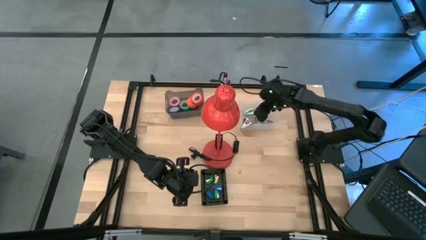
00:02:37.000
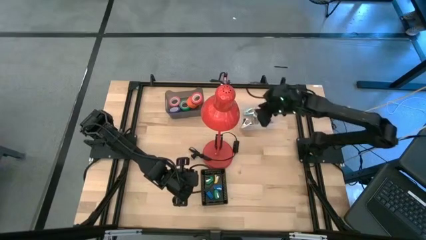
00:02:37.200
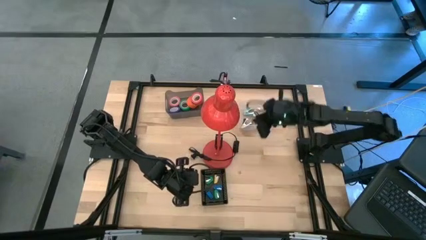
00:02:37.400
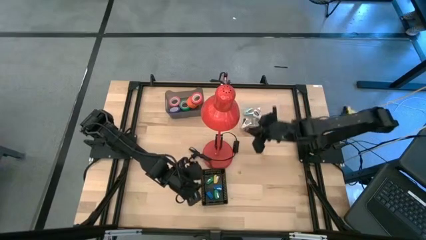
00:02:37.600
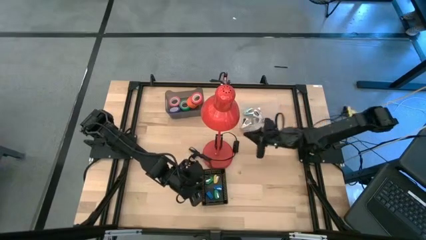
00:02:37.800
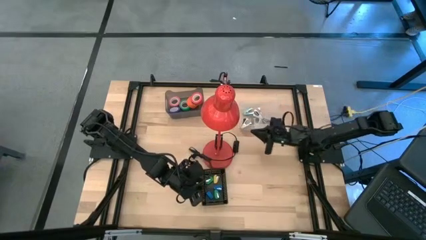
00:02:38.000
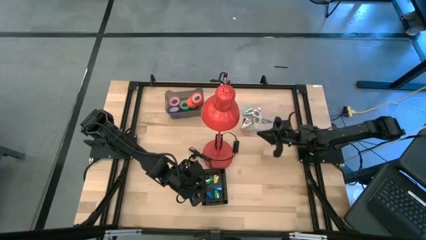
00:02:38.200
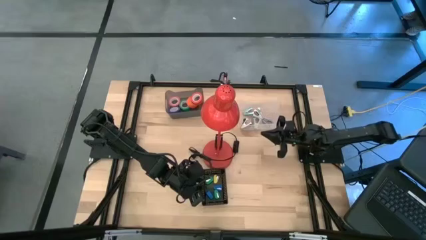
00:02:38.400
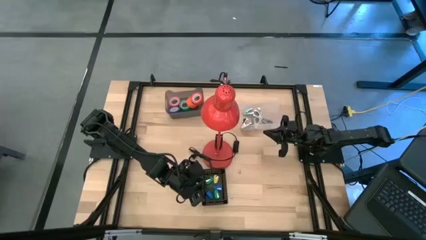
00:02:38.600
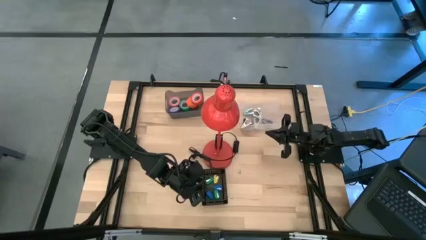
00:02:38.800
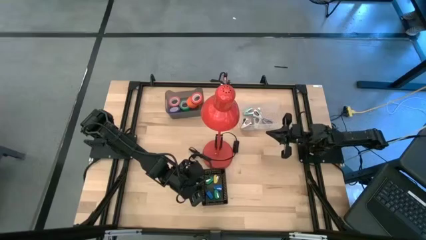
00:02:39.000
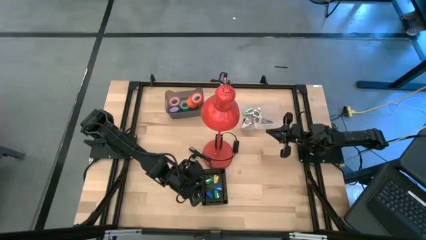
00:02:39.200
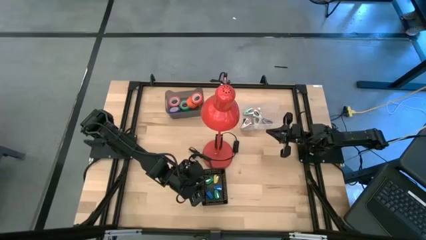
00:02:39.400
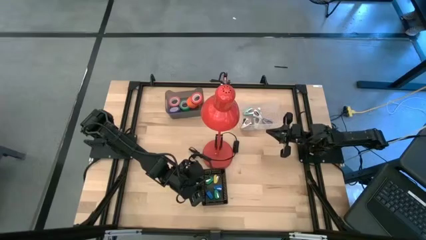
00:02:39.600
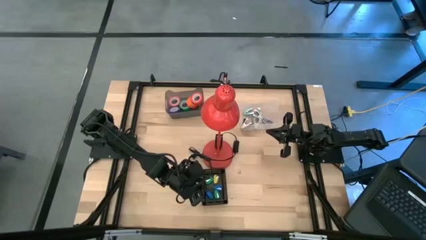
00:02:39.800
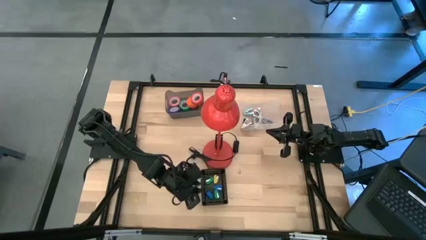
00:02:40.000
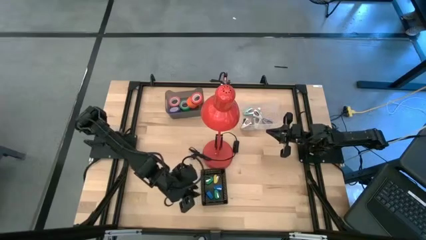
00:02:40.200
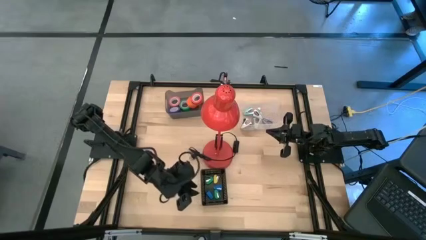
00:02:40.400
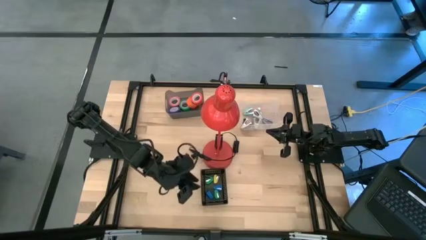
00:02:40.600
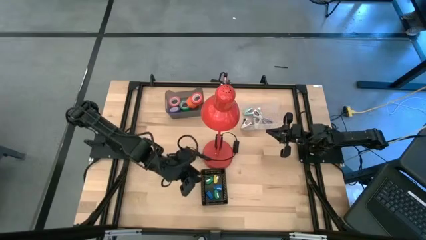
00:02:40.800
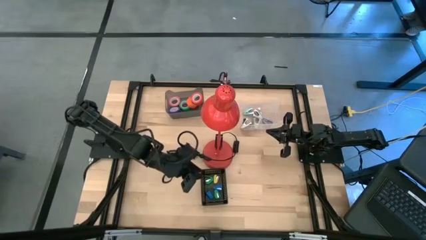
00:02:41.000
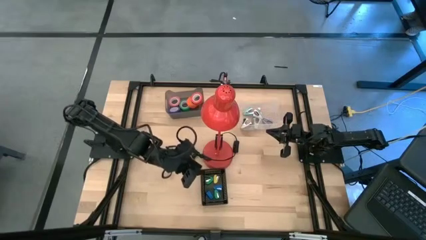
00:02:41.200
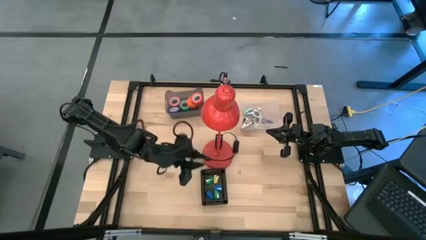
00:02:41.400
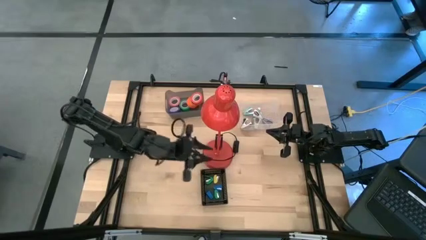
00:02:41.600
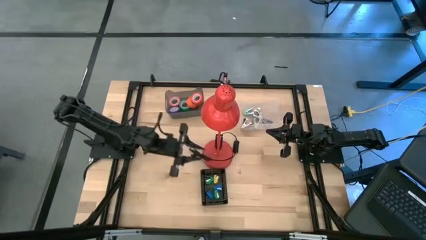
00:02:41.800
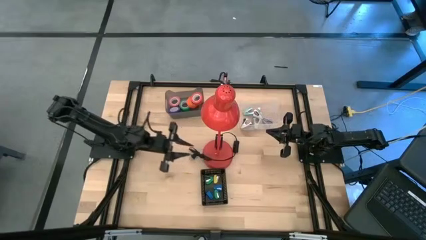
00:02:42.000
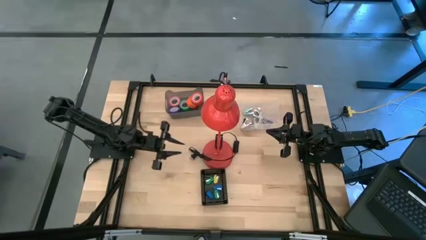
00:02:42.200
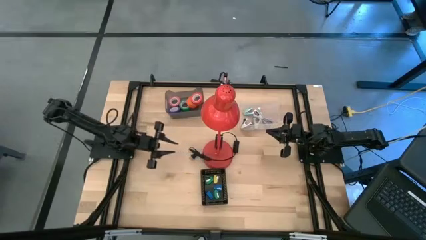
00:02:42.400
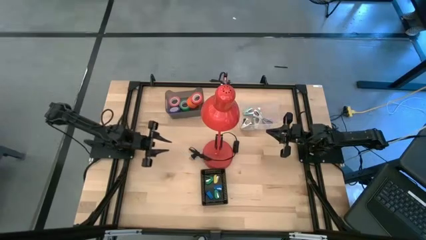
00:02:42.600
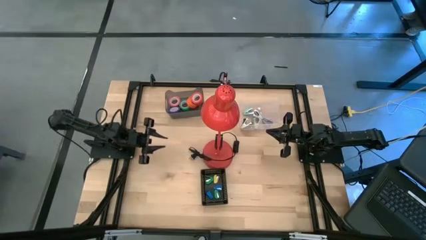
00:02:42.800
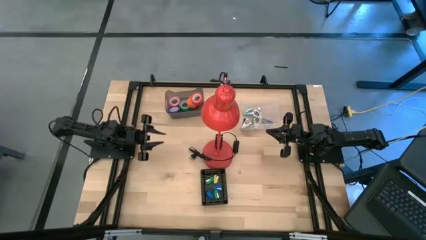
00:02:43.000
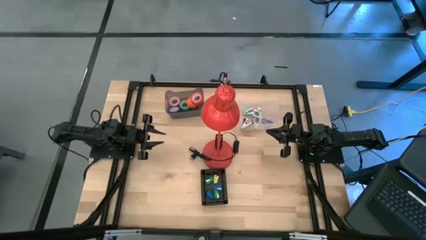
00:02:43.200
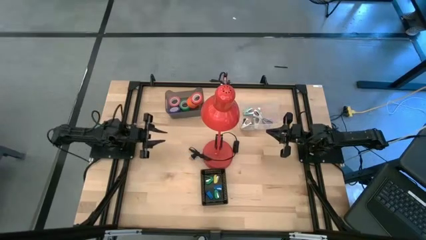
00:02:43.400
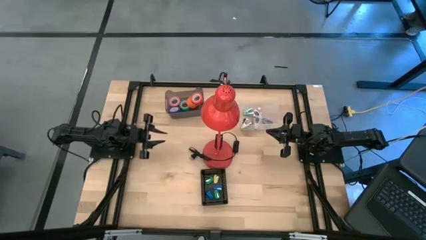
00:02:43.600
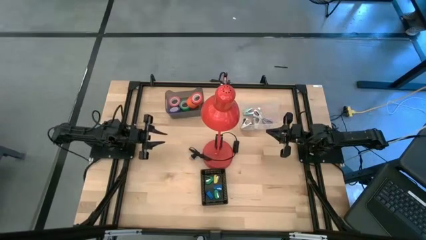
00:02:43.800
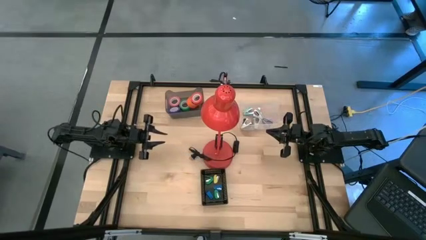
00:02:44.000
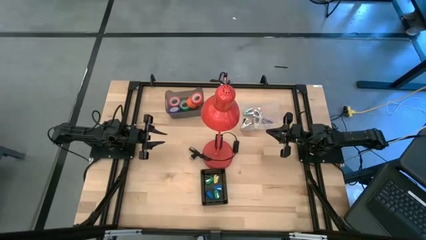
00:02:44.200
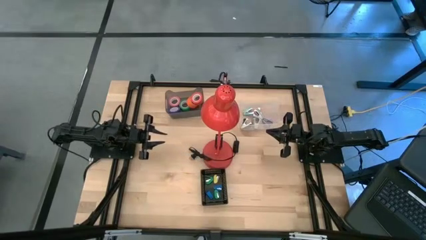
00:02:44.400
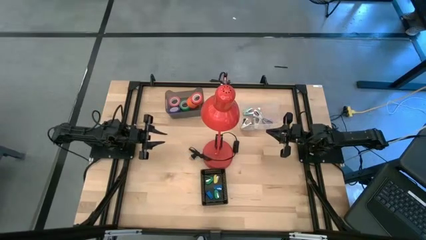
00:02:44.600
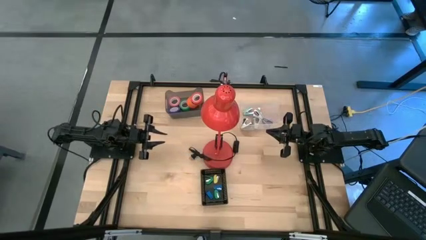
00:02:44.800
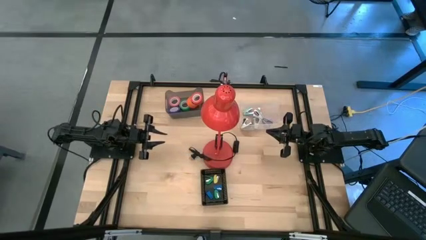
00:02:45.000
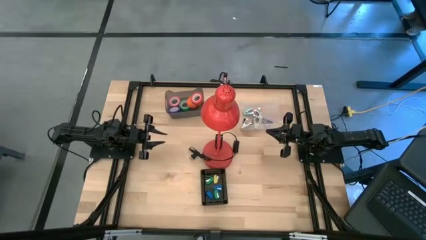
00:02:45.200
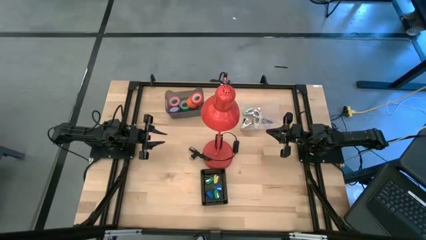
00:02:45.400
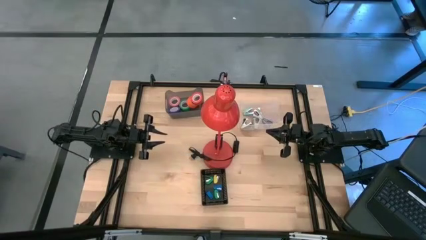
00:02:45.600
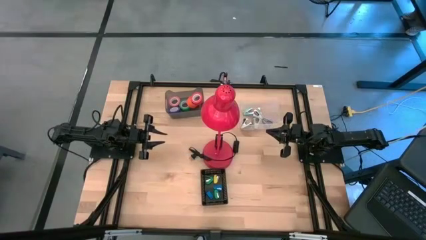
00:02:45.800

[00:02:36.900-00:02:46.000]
Task: Pick and place Stapler, Stapler remover, tape
Return to Home Position

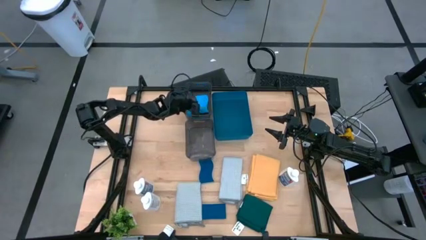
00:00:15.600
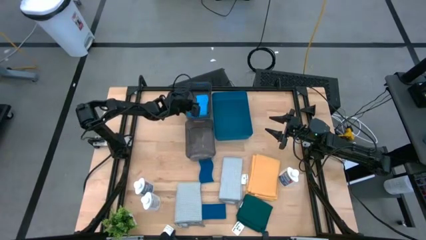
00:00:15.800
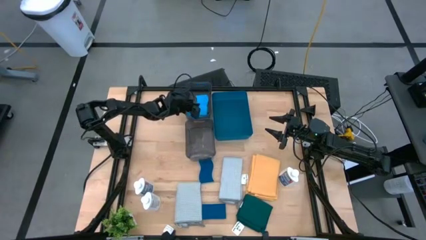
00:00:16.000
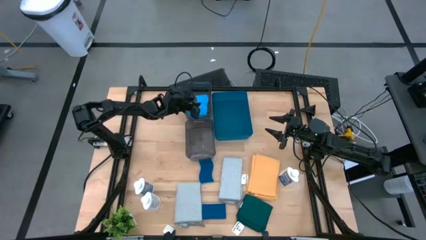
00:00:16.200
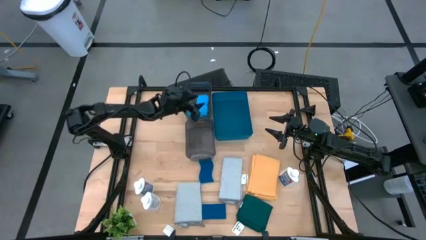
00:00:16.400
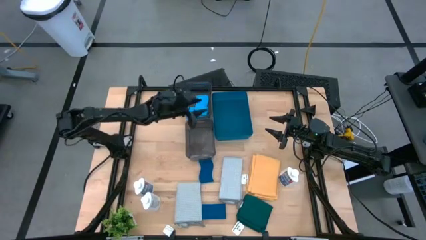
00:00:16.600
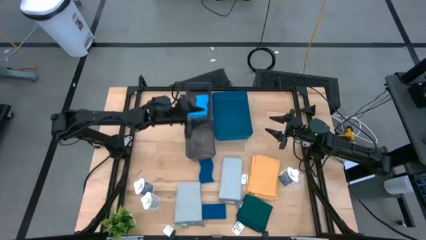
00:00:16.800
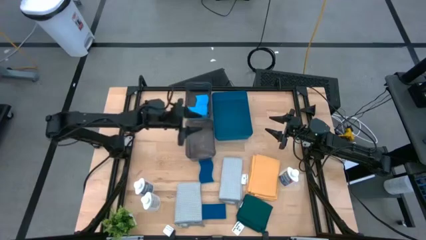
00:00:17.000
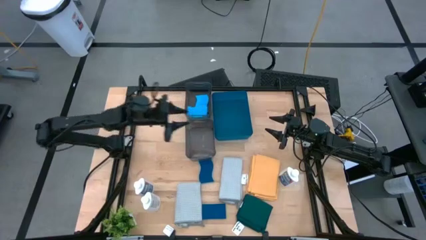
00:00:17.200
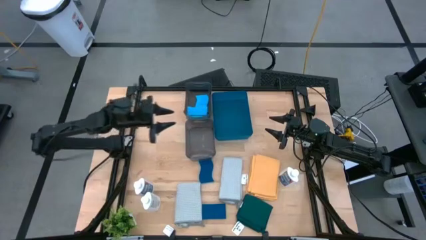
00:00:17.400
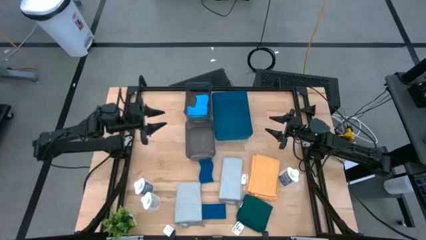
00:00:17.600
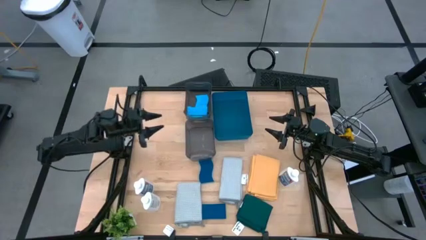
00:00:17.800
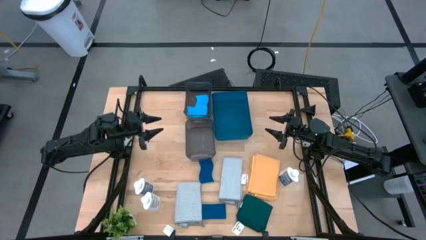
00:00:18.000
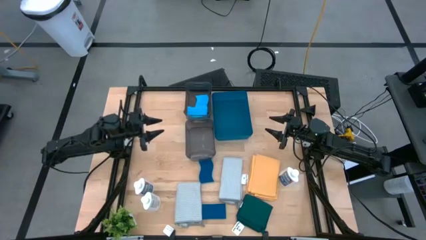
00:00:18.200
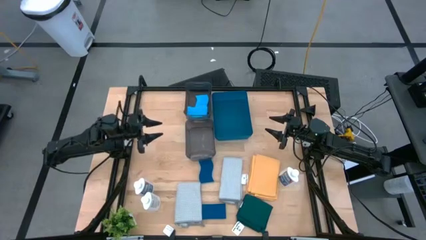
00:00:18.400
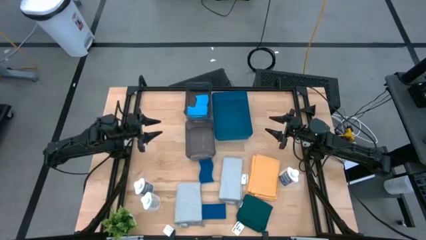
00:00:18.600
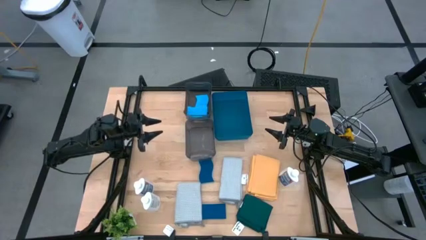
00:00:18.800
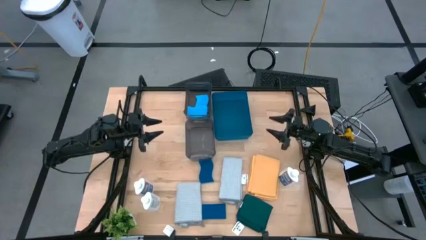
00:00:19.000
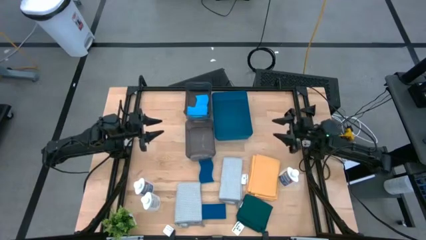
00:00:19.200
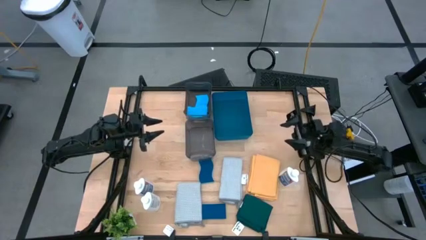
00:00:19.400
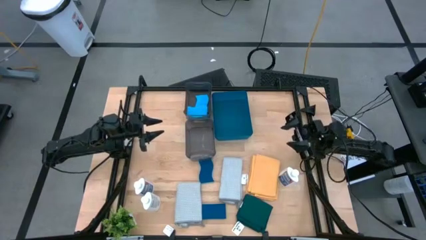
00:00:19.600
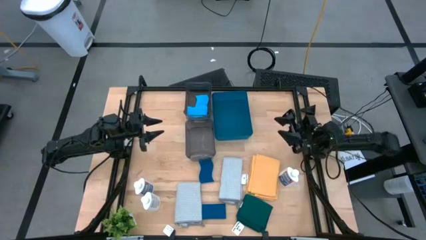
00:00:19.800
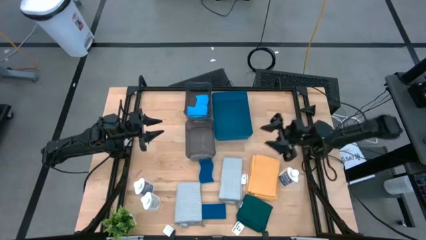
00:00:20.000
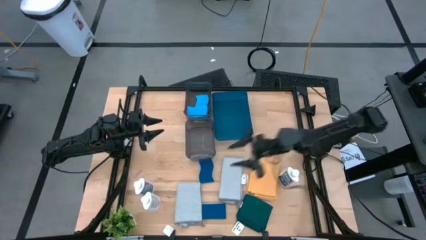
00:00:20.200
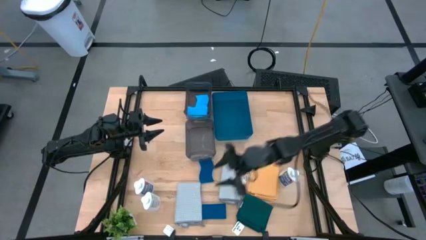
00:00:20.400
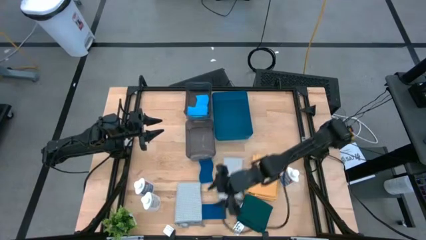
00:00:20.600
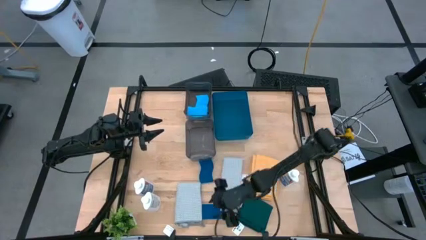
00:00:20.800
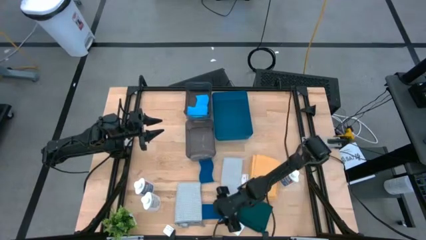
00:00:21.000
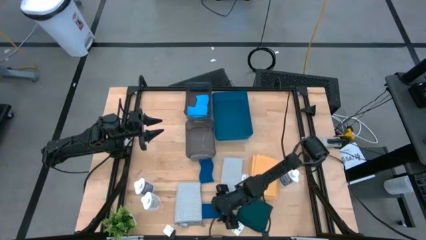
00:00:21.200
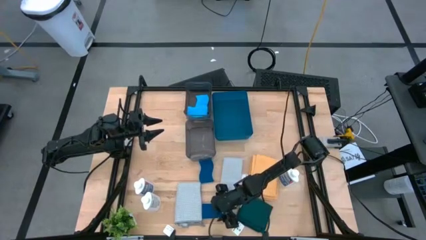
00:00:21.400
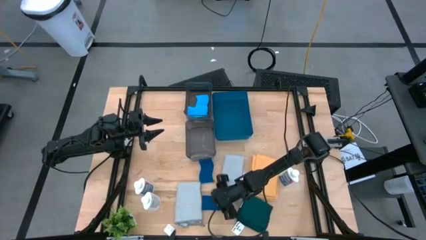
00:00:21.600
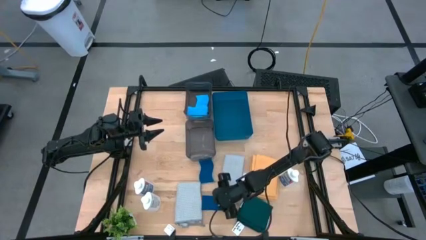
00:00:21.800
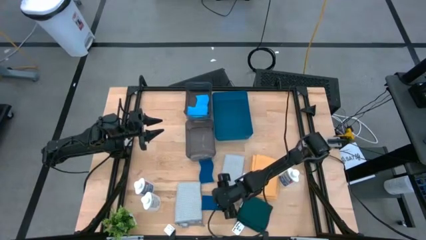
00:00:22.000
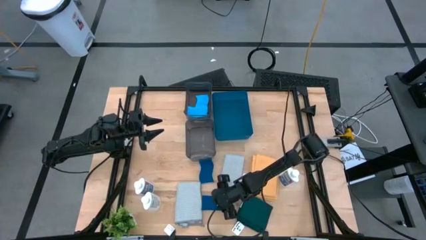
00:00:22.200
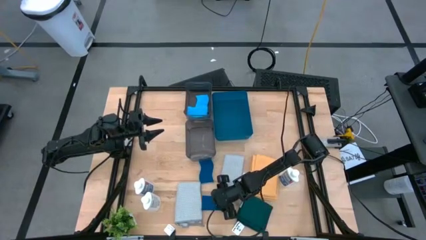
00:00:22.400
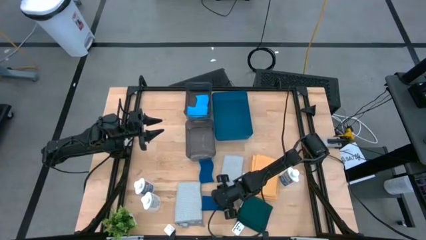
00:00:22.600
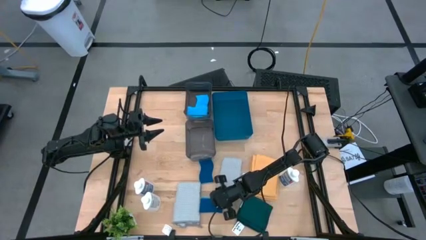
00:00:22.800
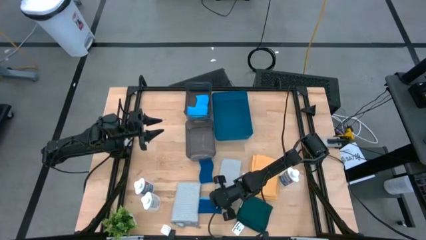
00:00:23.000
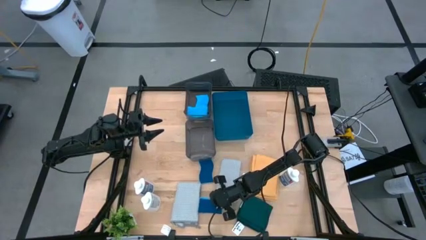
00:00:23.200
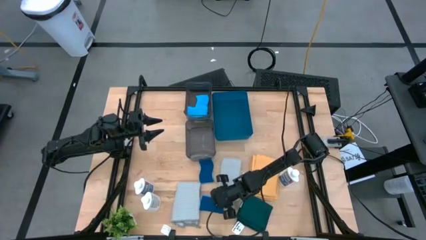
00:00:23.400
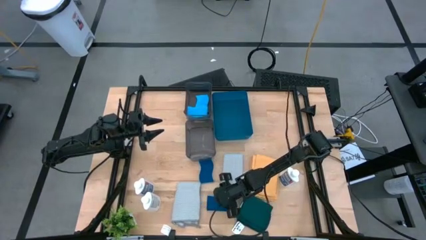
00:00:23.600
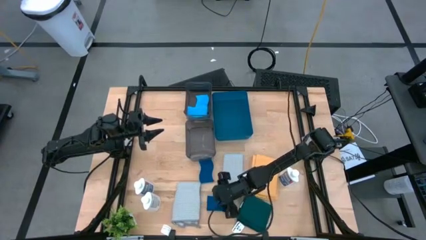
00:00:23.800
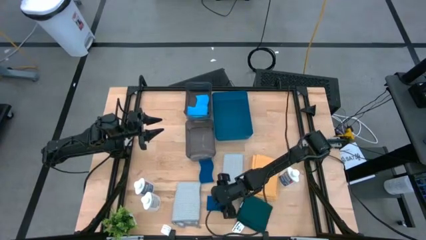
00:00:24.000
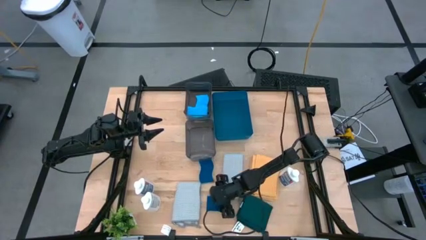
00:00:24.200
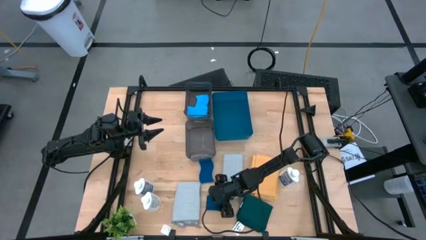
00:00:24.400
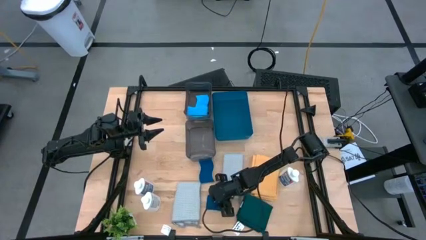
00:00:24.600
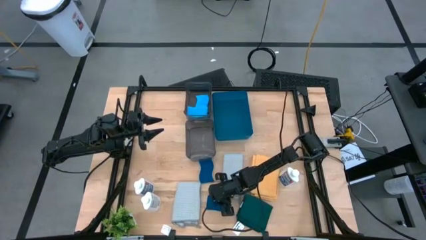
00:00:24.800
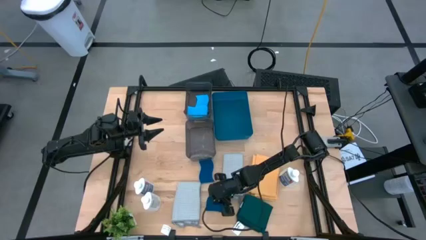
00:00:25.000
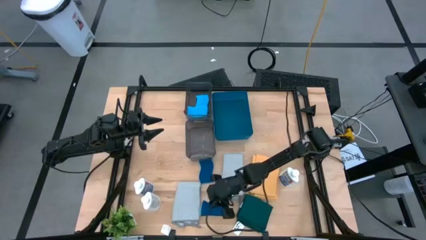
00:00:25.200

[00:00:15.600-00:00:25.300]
Task: Pick & Place Kitchen Items
Put the blue sponge into the top black bin
